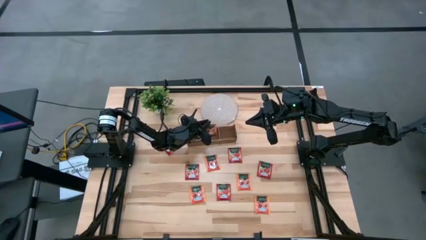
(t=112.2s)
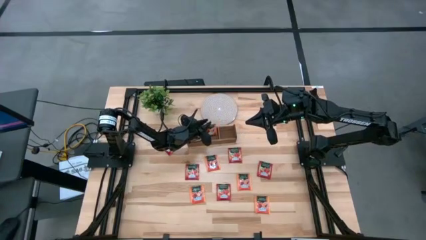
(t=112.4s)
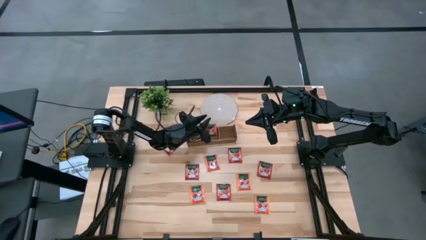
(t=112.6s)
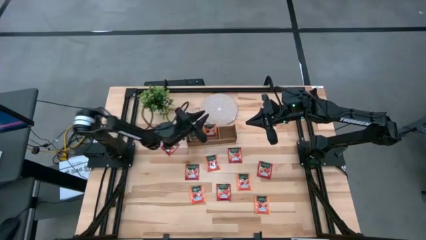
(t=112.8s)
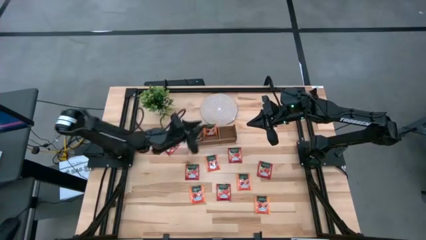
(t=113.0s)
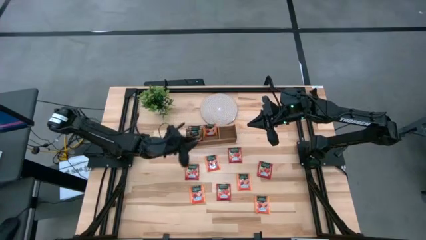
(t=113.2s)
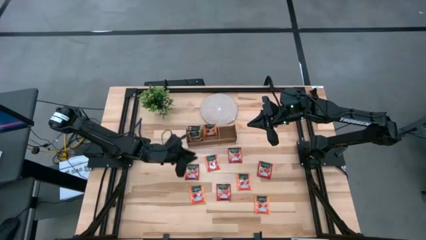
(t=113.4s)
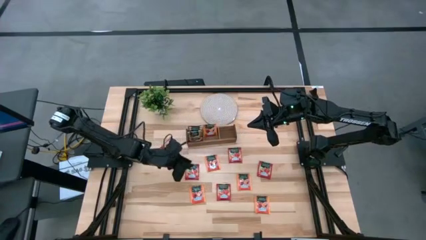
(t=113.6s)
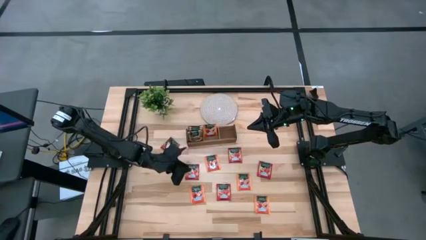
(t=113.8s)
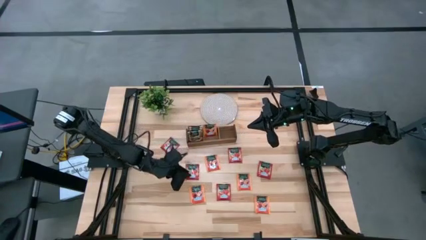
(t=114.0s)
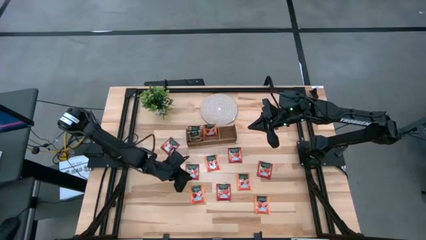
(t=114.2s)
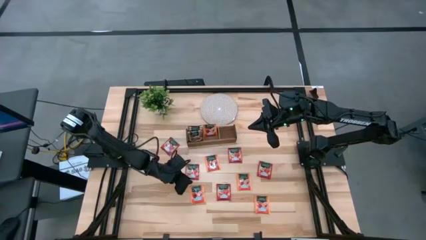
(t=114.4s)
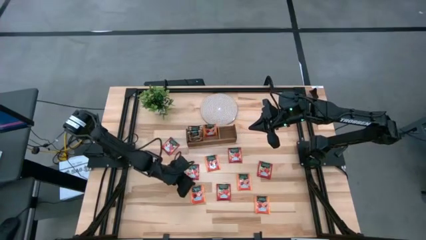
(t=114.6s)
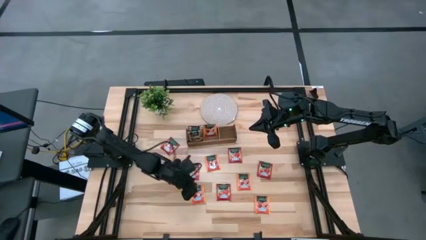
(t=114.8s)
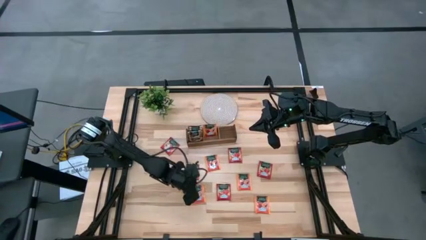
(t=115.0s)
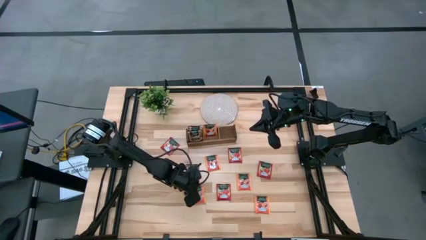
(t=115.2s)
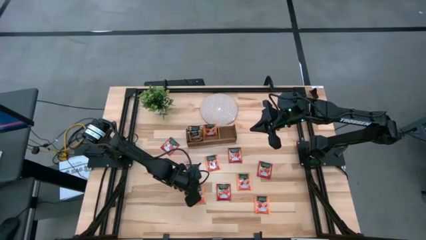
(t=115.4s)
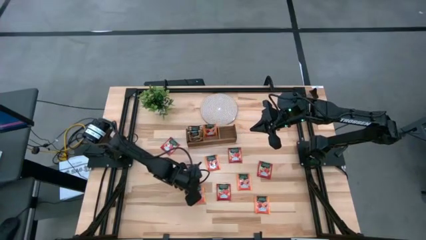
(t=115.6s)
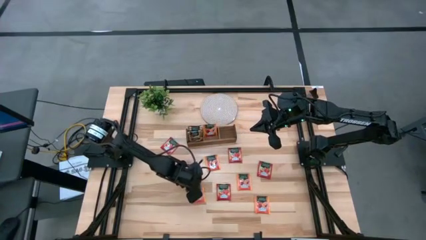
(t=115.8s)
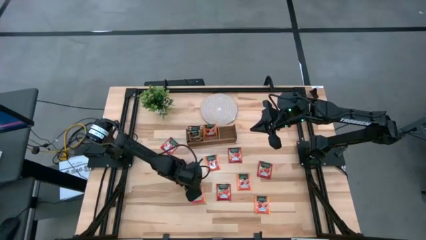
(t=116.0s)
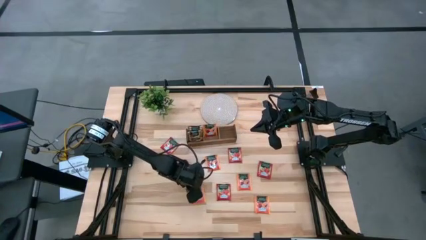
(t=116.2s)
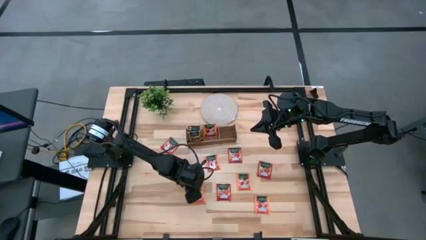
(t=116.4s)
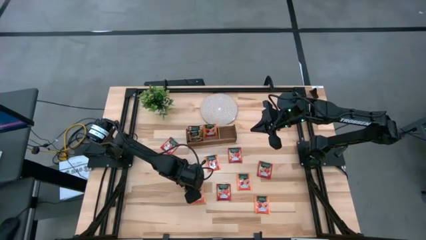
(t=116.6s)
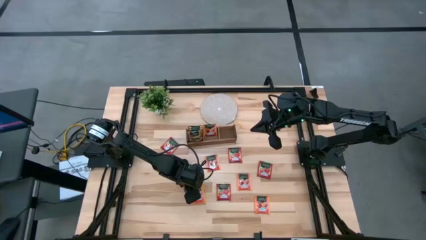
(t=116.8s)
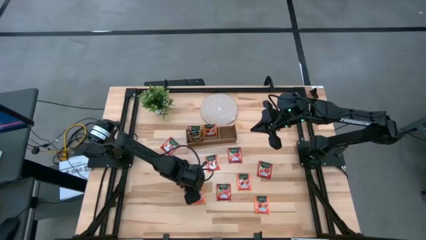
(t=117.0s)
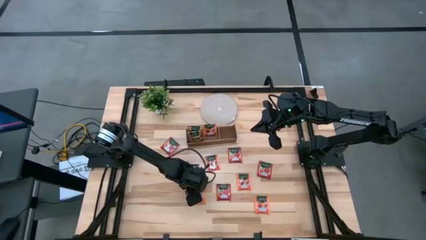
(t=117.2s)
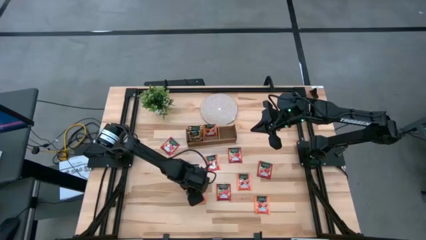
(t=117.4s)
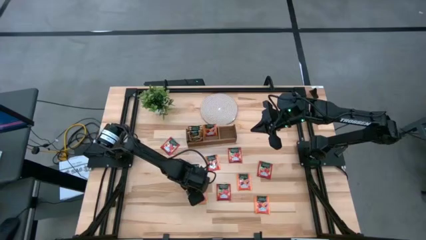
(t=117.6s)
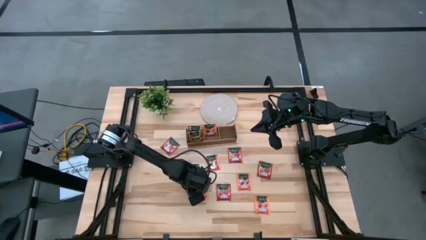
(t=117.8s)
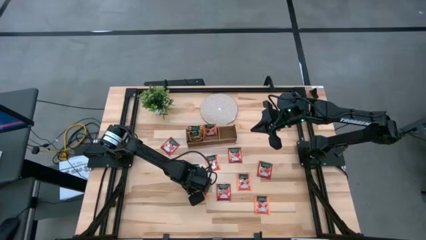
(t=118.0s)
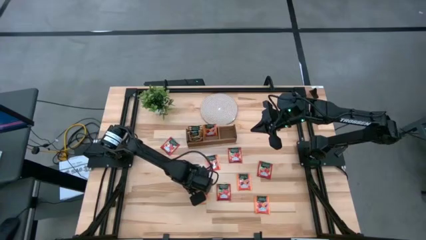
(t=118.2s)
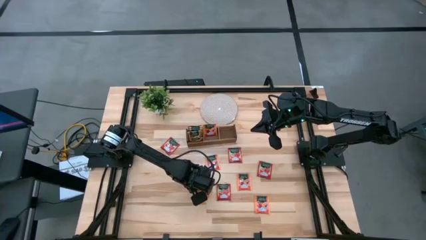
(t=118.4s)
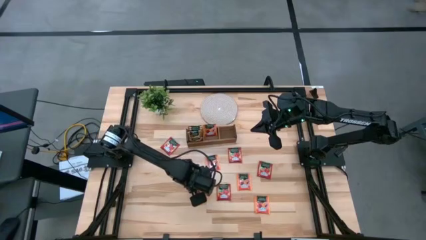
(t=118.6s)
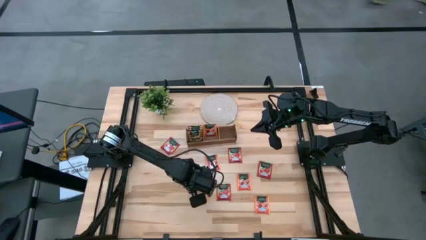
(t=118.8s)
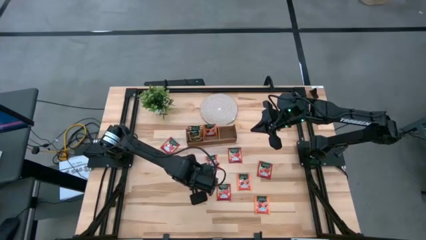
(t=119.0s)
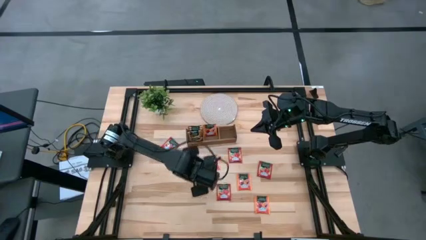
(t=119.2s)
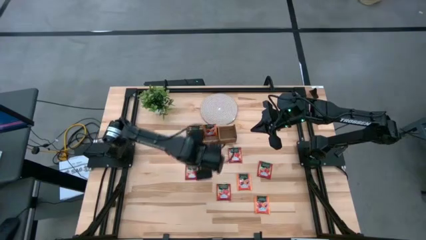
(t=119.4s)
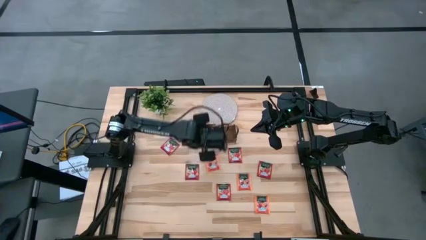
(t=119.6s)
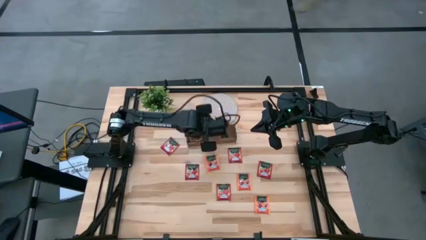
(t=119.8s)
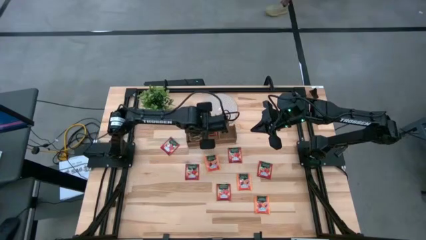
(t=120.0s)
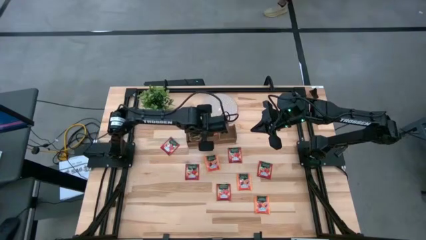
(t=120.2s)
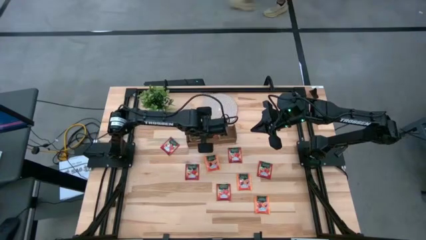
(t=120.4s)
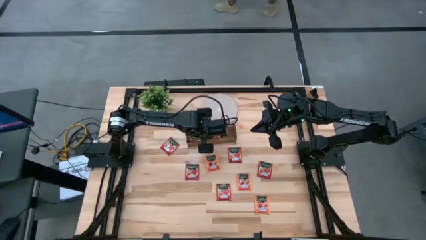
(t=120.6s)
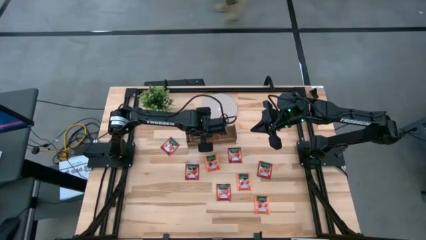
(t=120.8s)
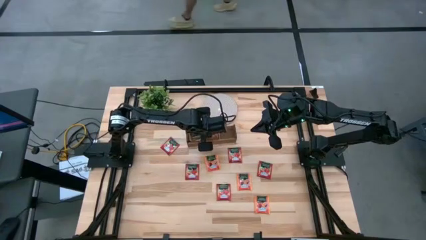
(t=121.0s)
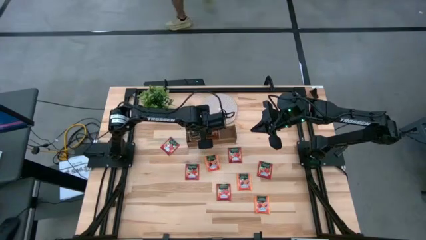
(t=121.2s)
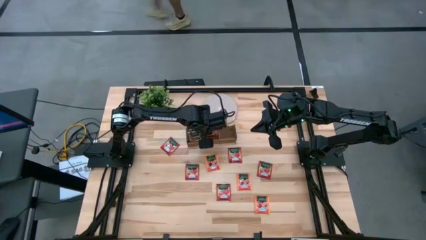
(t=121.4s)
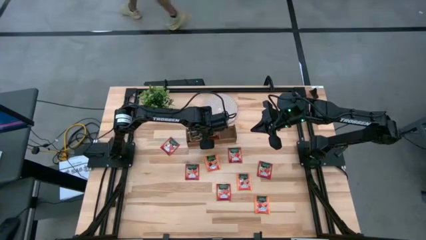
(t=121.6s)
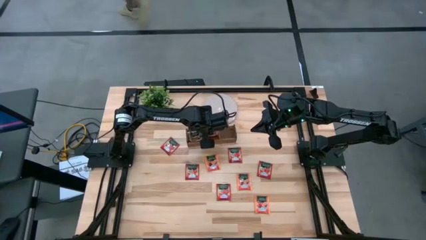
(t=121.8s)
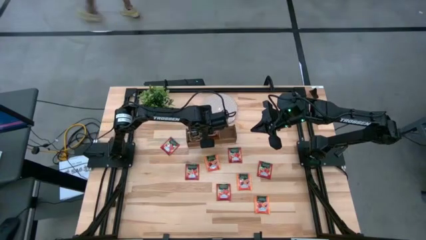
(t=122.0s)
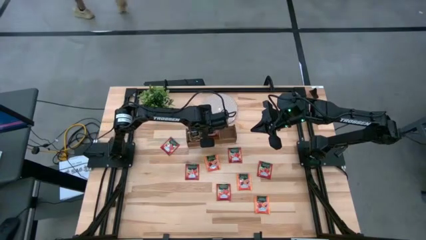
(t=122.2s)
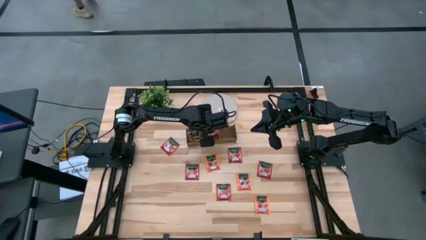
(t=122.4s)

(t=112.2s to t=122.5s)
Task: Pick & Place Tea
Put the orange tea bag into the middle of the wooden organizer

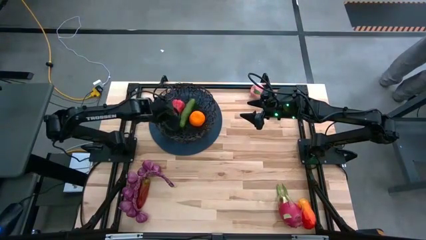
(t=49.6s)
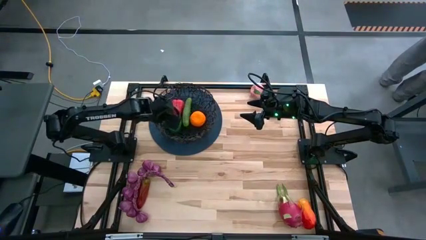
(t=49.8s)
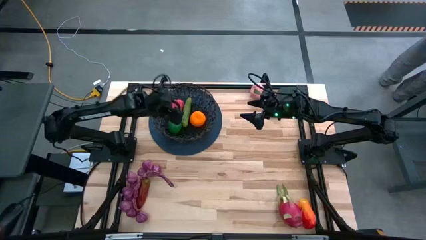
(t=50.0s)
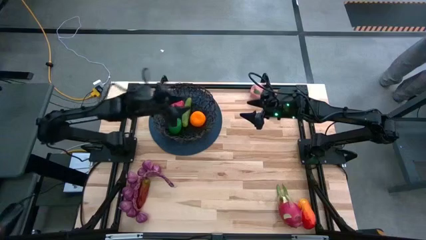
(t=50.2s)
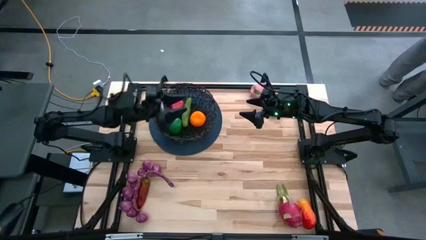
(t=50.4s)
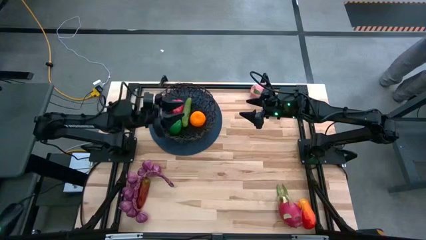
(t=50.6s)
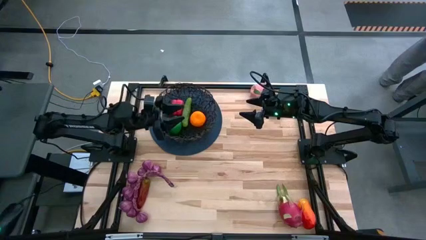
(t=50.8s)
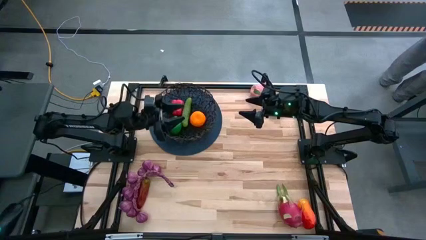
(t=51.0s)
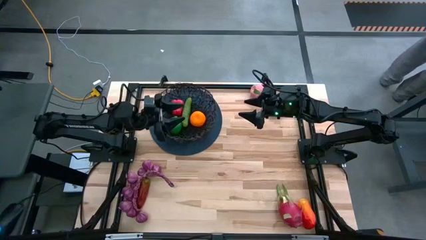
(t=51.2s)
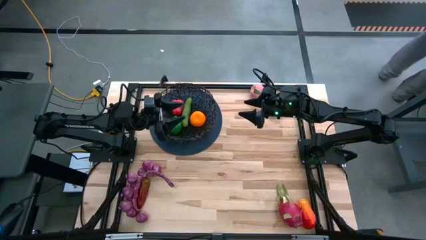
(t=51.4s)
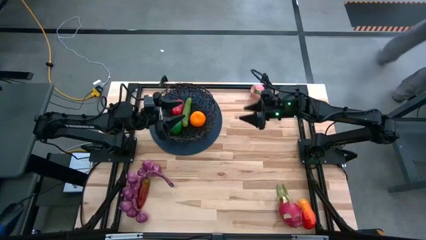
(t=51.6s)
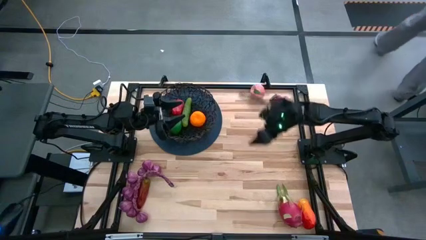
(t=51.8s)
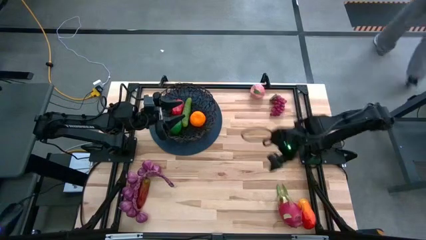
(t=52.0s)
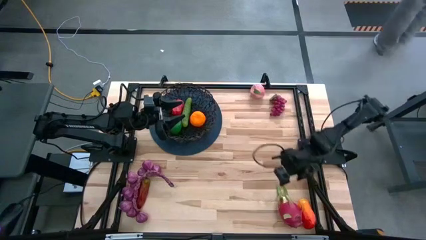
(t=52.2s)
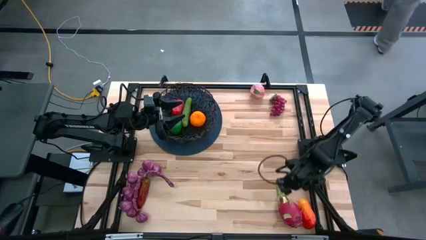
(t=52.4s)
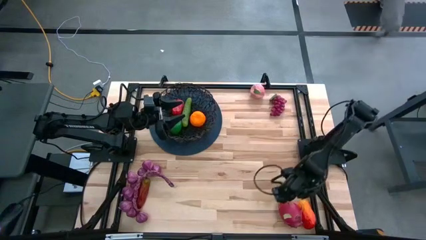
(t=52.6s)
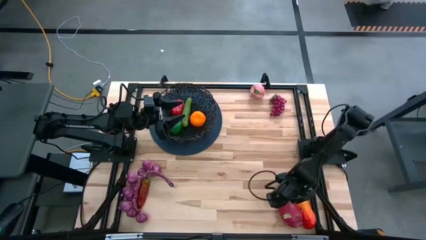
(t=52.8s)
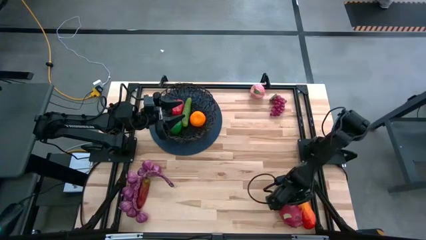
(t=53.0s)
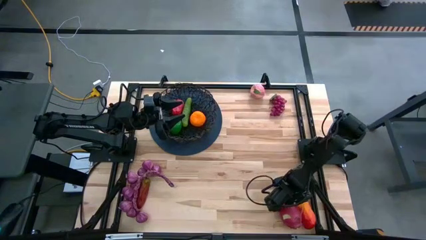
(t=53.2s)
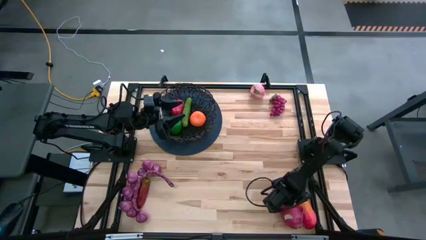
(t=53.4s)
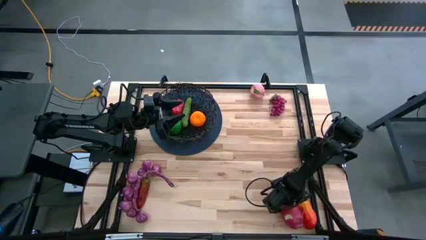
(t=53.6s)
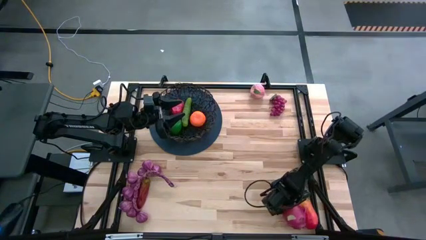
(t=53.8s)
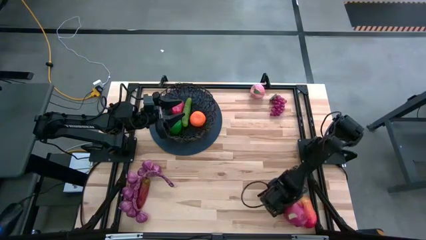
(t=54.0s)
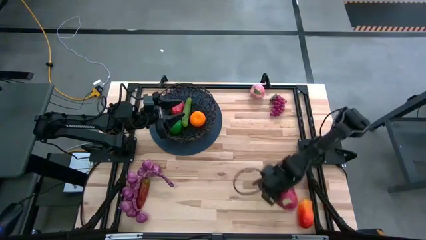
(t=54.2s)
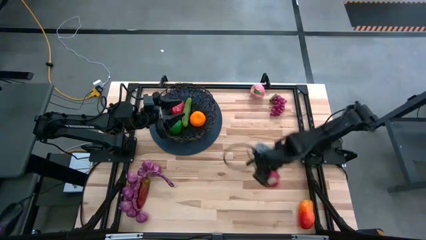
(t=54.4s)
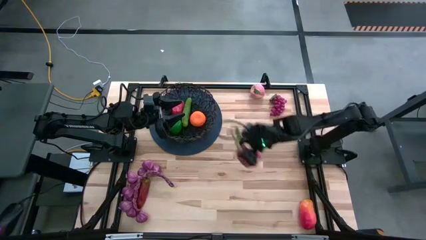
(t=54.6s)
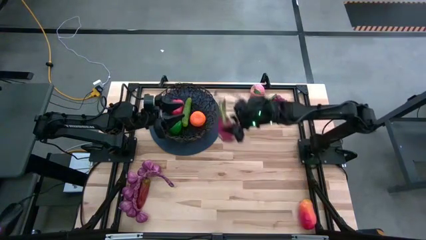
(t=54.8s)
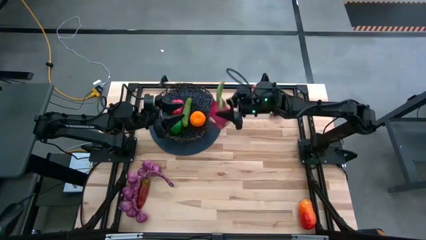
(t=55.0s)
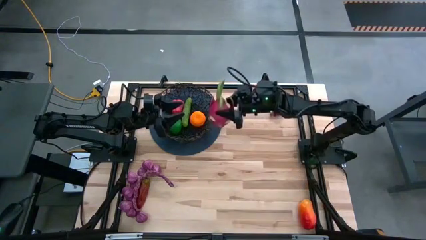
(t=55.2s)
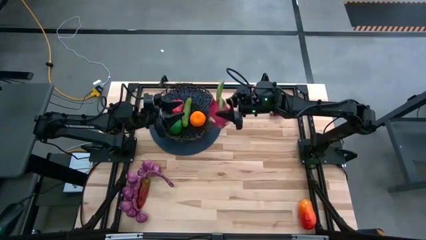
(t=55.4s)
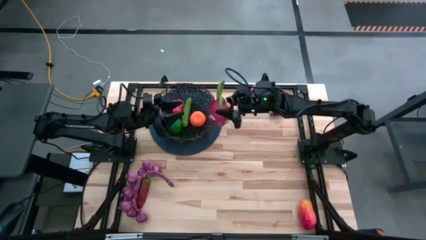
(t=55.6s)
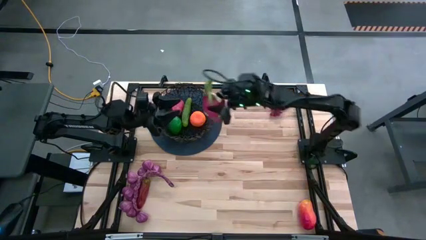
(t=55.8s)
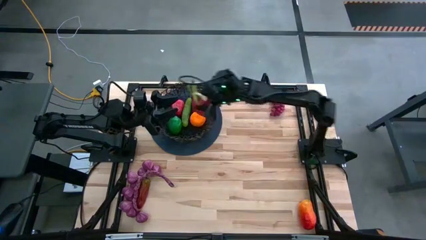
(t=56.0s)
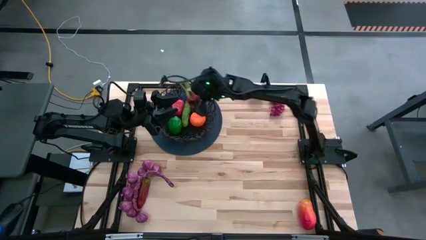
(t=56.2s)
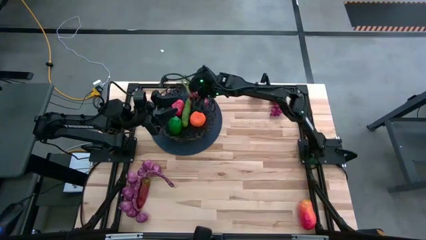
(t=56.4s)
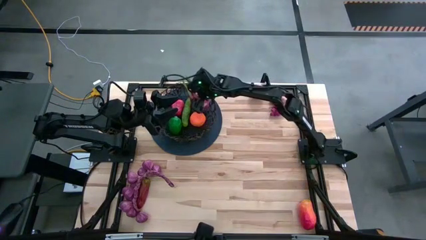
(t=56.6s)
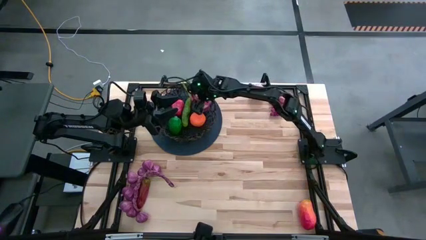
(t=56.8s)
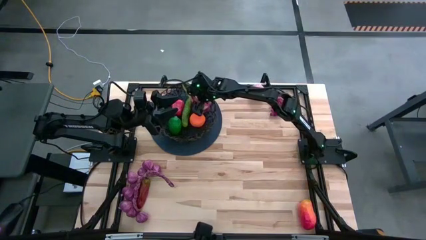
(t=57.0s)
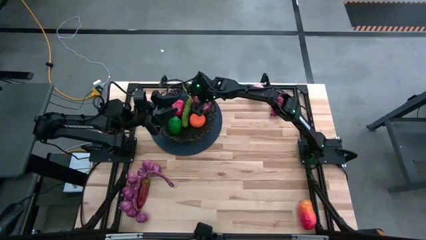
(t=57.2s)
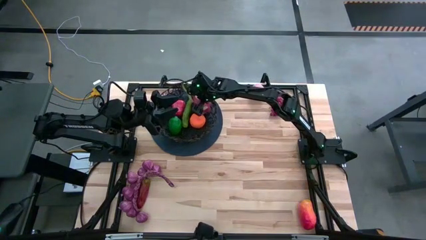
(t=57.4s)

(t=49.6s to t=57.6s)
Task: Build produce basket
Put the red dragon fruit into the black wire basket
